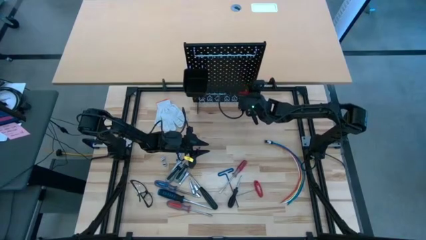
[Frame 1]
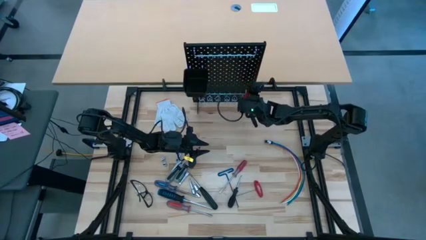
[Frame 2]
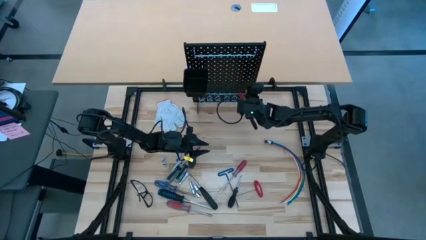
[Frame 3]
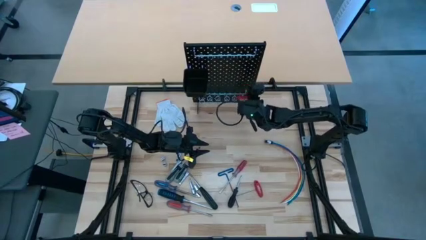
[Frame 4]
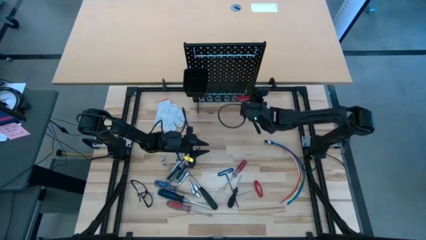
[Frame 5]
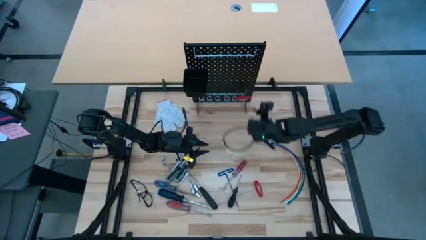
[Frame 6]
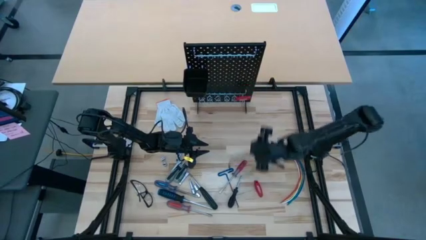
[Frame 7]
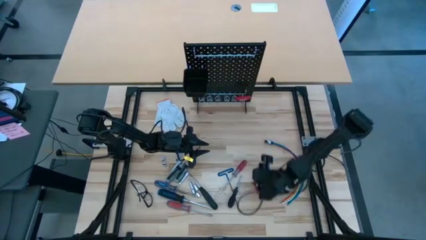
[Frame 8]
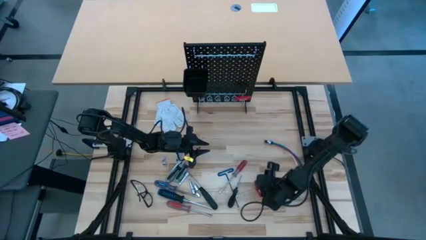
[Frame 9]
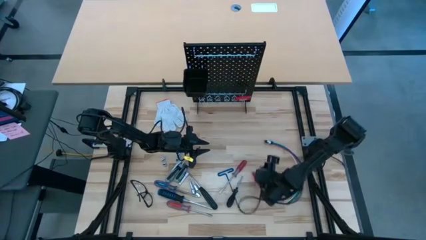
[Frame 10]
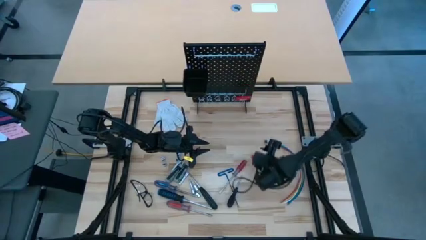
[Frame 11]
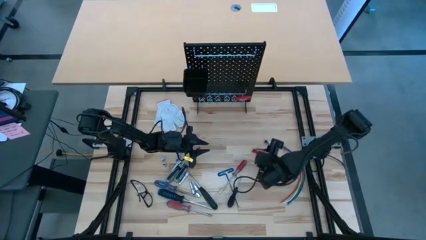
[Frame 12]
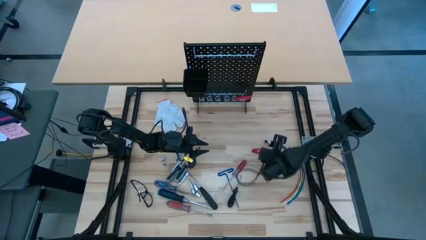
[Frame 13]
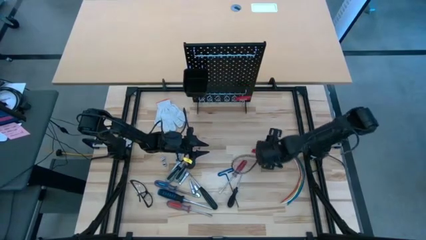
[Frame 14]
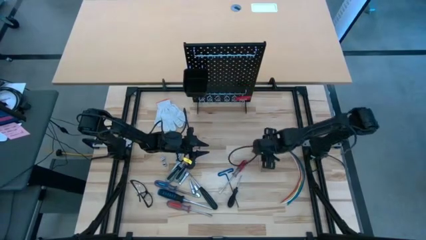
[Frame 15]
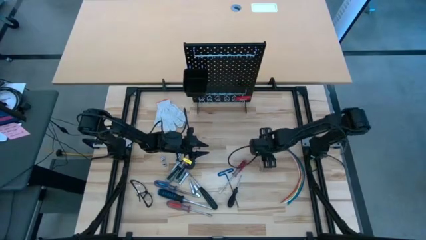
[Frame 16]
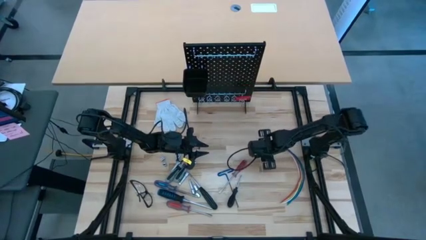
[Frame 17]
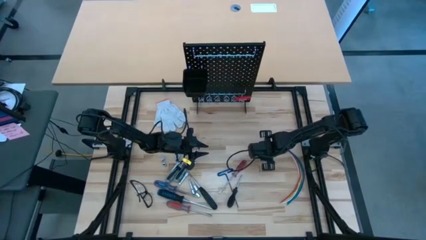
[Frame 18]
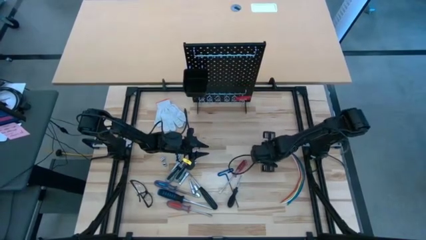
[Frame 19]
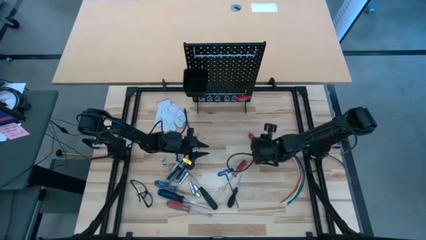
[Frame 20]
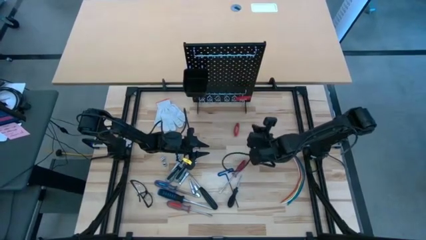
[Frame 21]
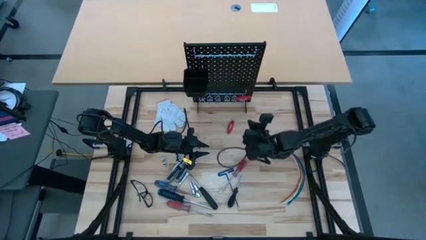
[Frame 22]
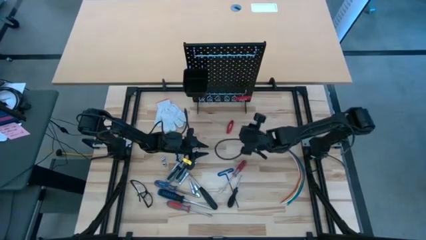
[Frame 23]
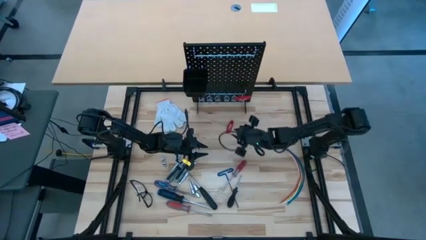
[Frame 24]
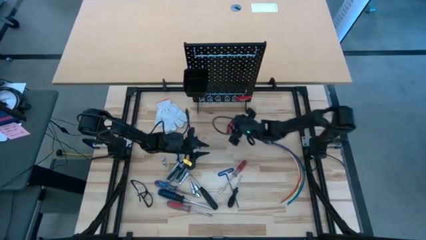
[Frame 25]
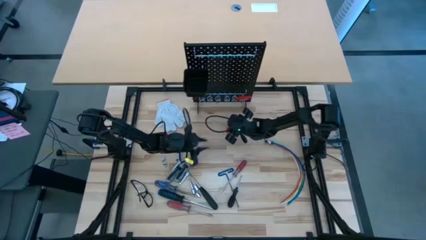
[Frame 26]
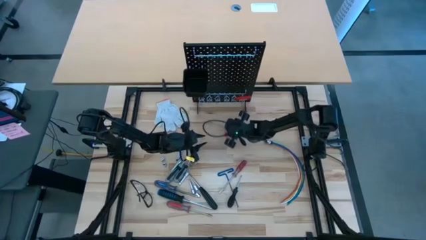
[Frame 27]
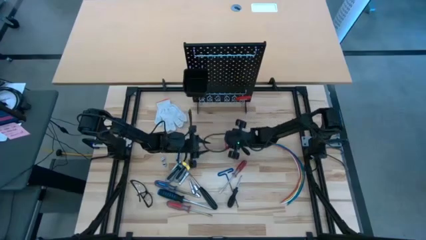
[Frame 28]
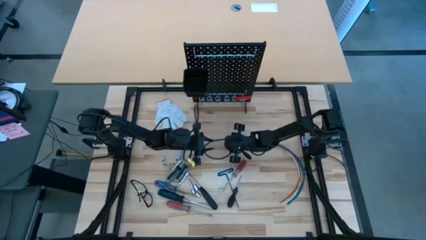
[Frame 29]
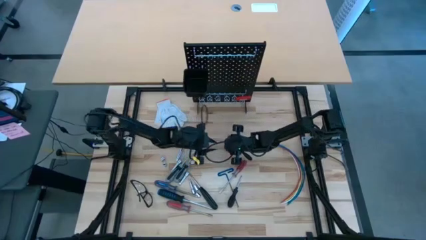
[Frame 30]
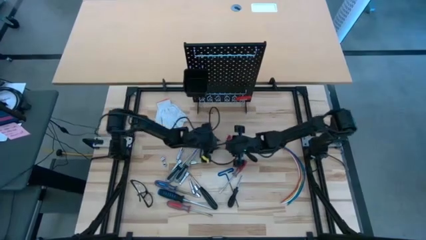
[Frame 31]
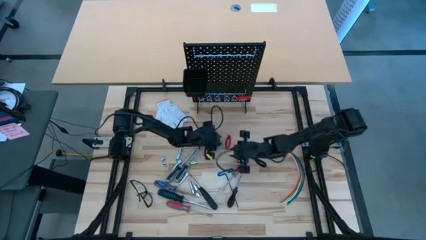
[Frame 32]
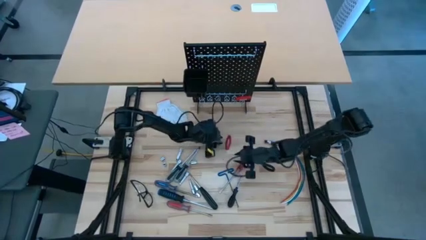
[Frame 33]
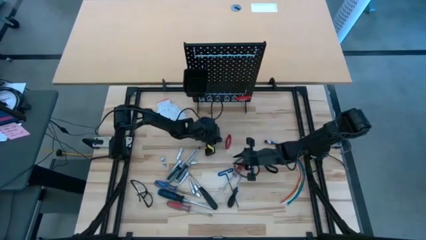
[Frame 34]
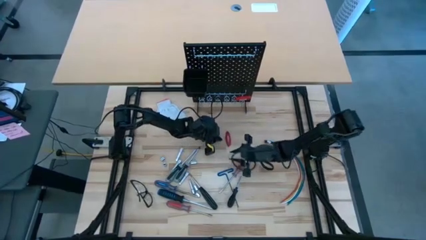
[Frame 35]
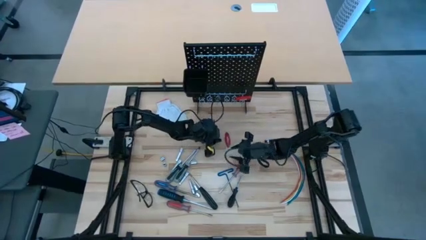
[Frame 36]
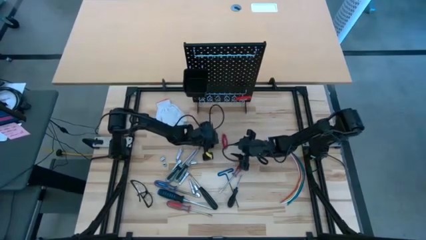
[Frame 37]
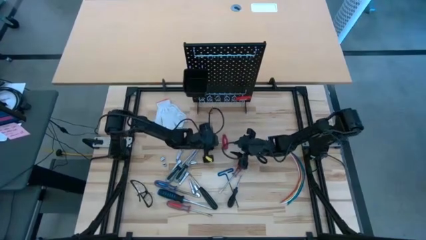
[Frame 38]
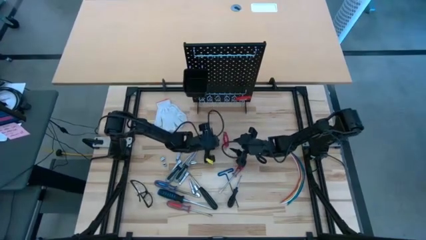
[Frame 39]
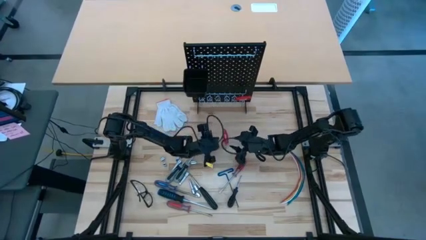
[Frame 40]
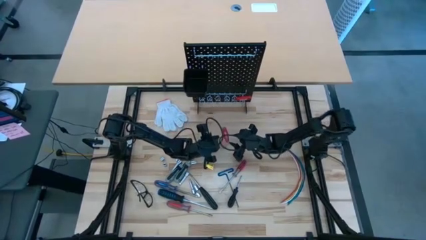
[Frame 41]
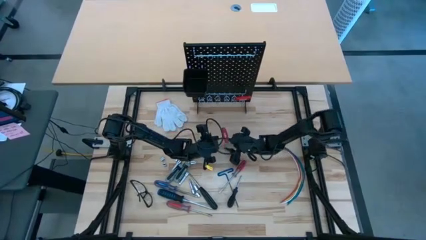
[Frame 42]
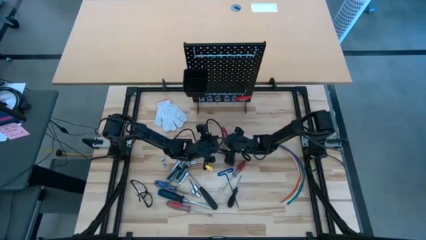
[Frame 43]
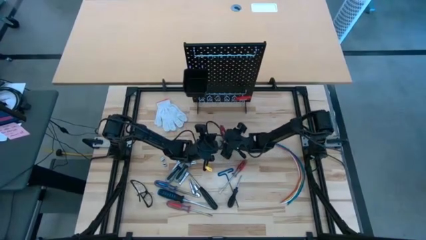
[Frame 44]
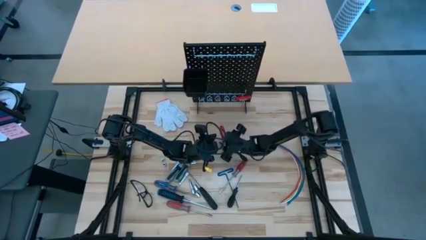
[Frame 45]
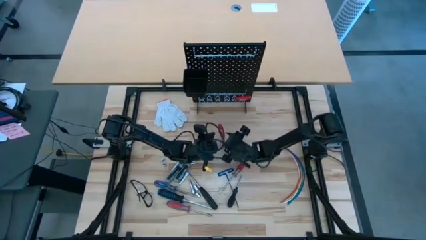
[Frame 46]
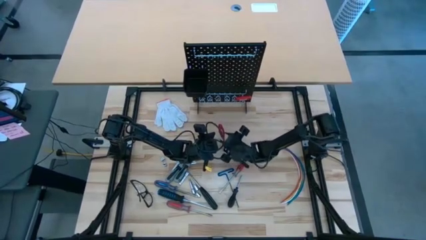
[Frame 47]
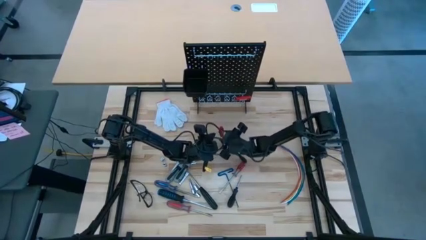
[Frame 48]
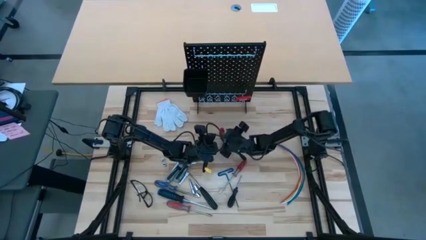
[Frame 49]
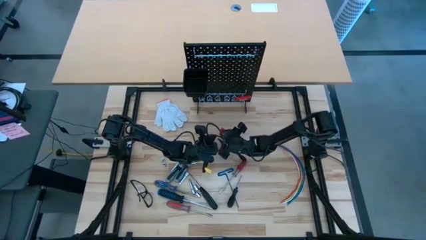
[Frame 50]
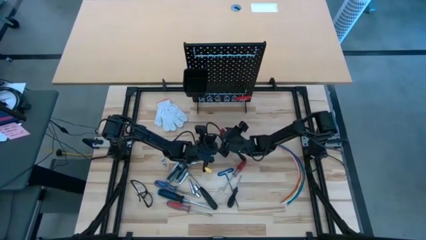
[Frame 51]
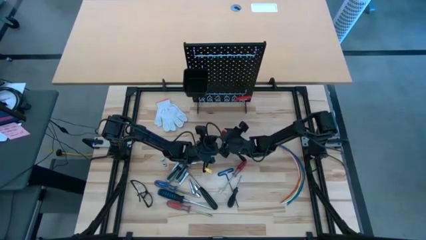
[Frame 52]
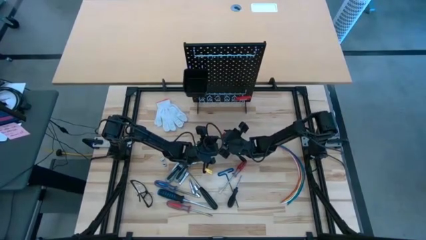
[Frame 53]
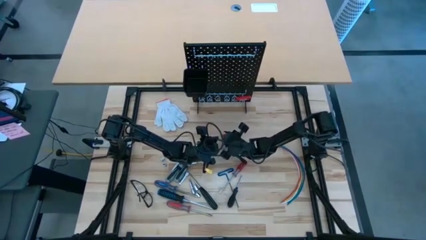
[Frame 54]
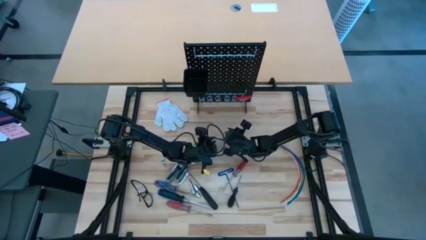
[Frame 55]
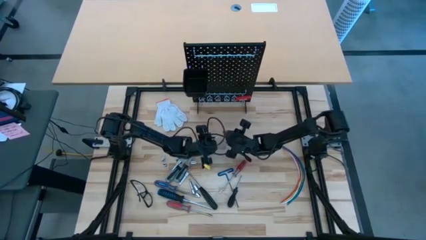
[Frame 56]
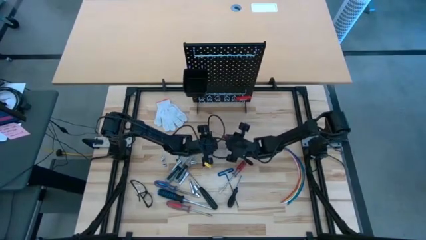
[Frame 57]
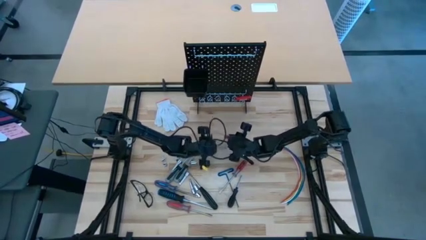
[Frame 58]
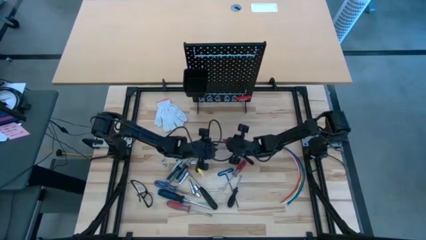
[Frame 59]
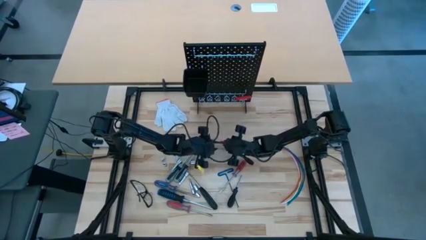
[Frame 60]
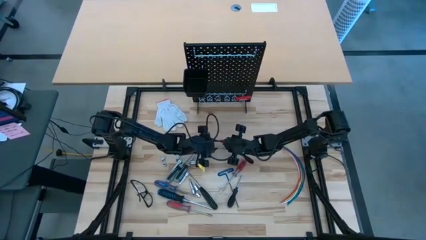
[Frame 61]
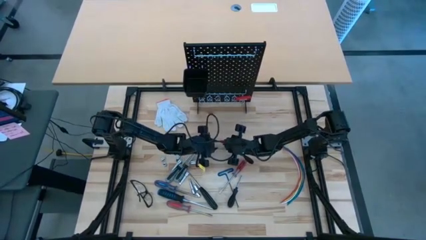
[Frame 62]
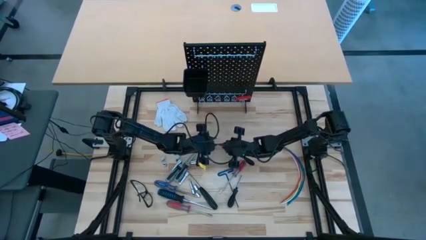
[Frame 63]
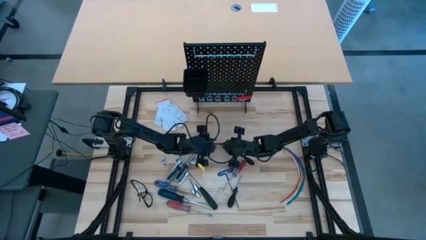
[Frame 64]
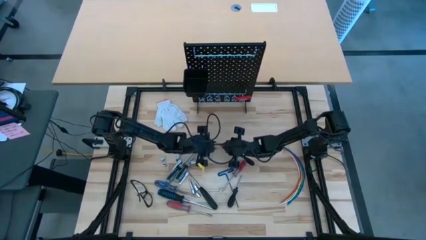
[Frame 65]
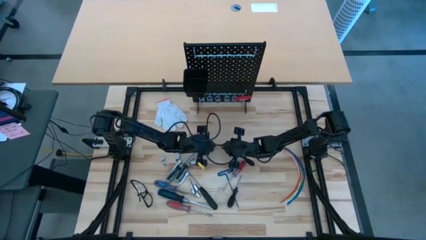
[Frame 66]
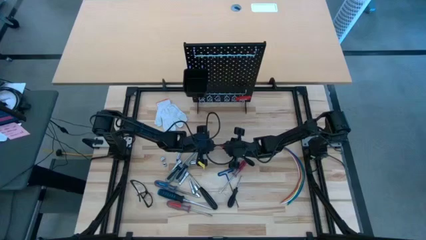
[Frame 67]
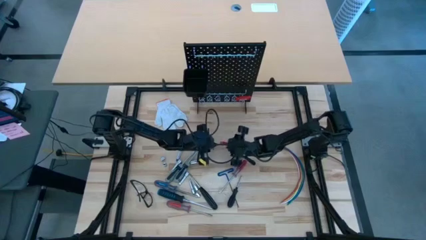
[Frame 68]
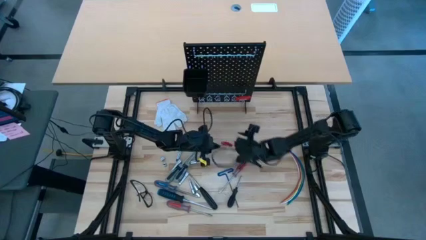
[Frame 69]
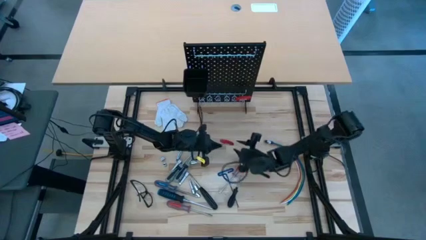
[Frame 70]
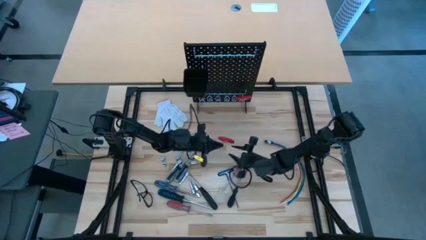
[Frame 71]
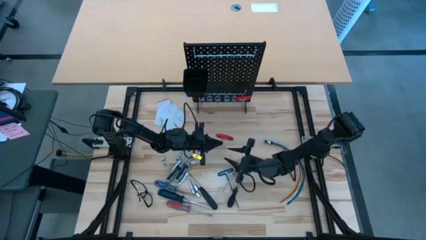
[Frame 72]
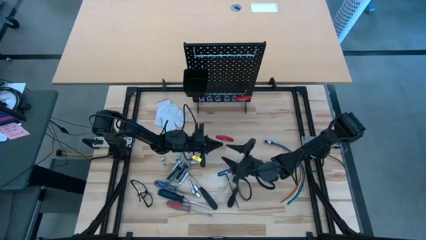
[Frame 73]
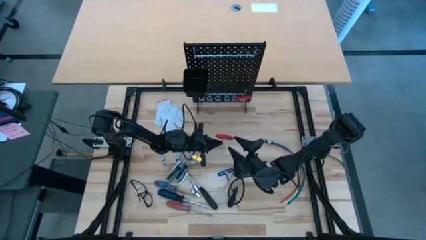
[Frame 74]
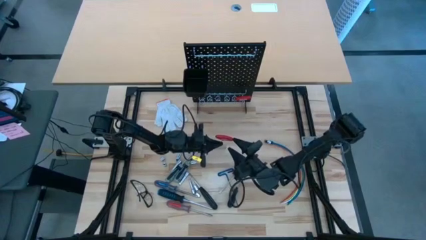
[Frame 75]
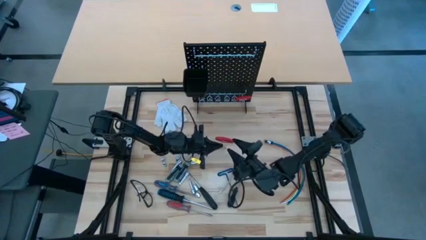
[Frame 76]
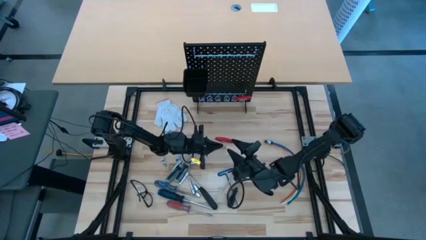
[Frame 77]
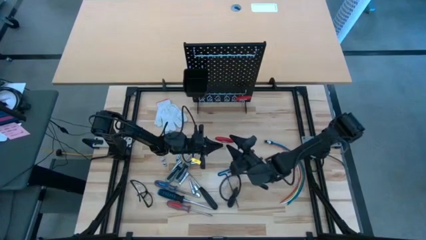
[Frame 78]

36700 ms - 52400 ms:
Task: Hang tools onto peg board
Hang the red allen wrench on the pegboard
